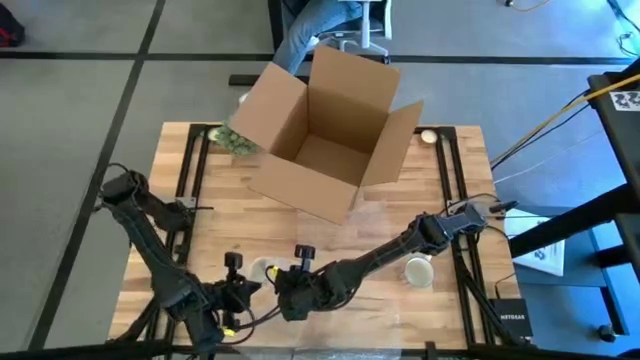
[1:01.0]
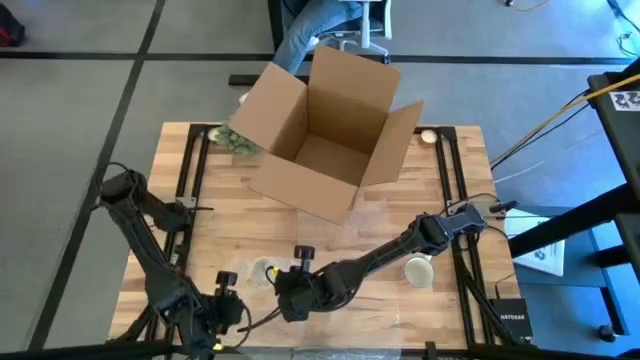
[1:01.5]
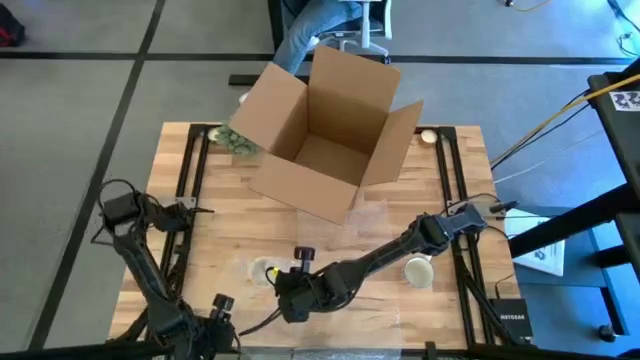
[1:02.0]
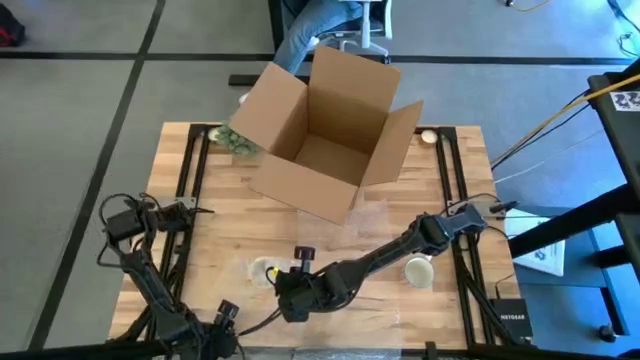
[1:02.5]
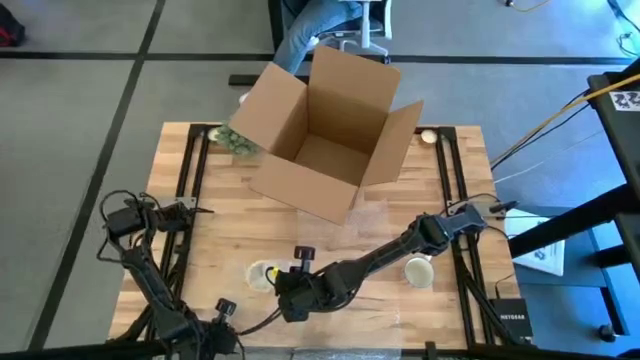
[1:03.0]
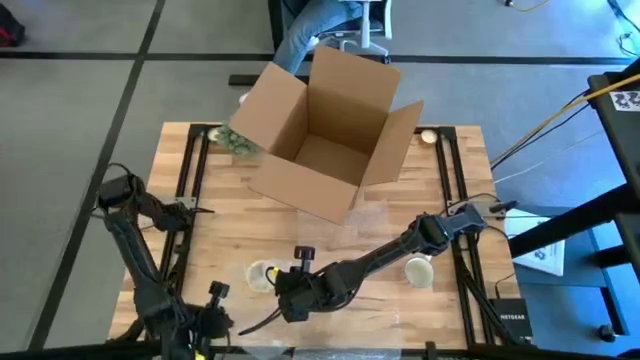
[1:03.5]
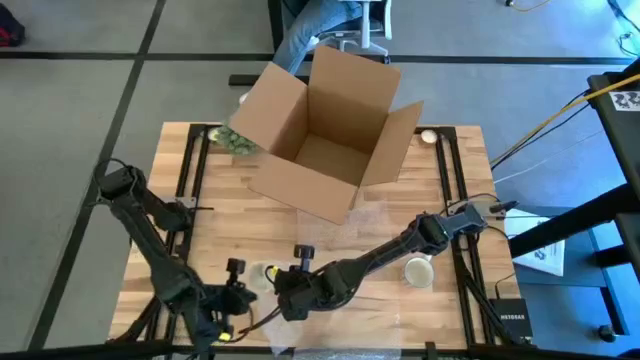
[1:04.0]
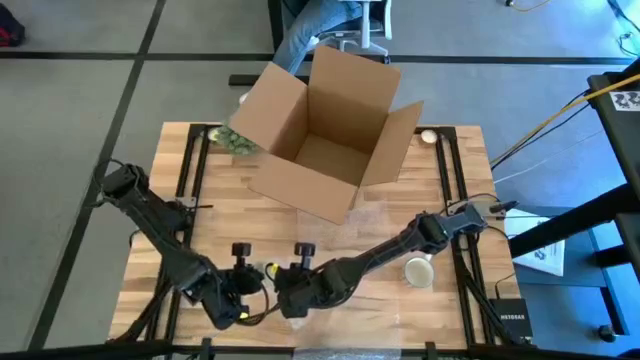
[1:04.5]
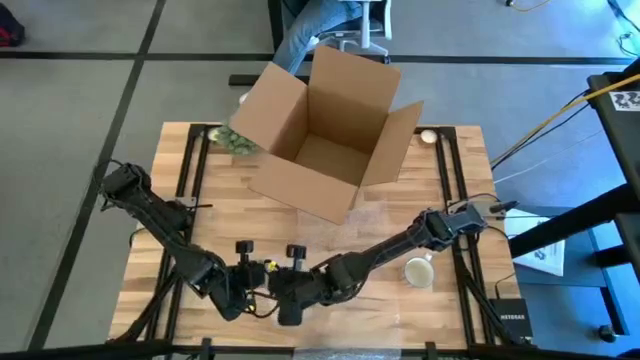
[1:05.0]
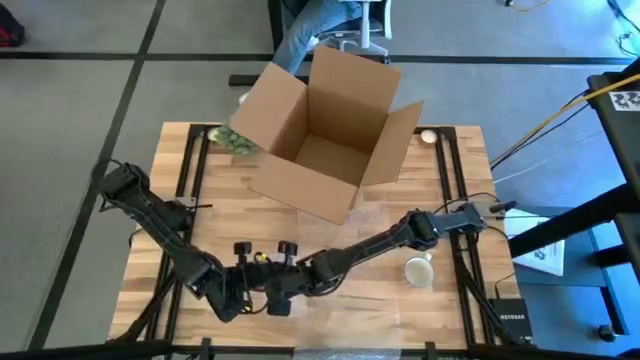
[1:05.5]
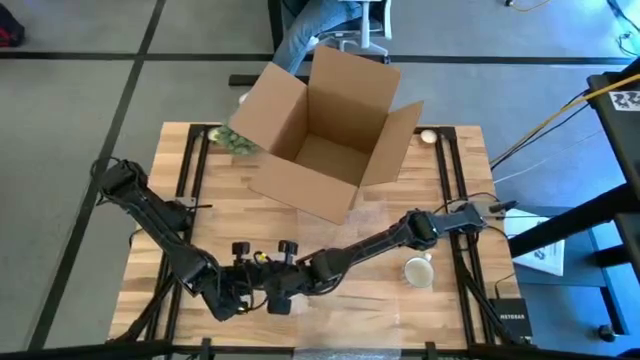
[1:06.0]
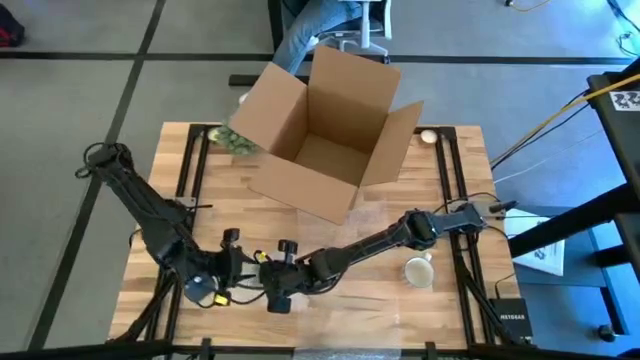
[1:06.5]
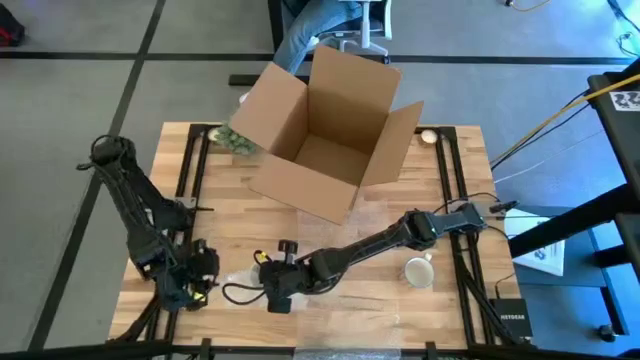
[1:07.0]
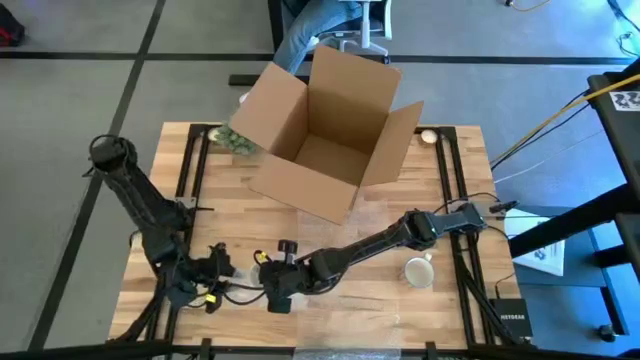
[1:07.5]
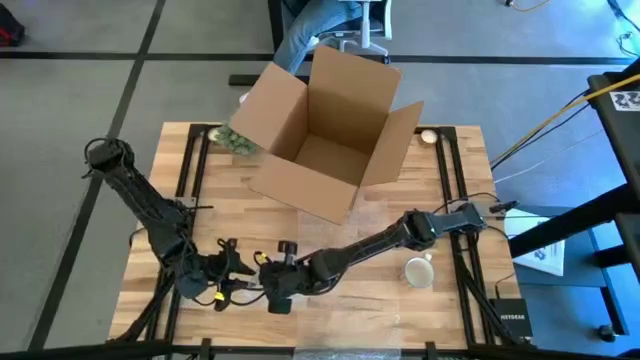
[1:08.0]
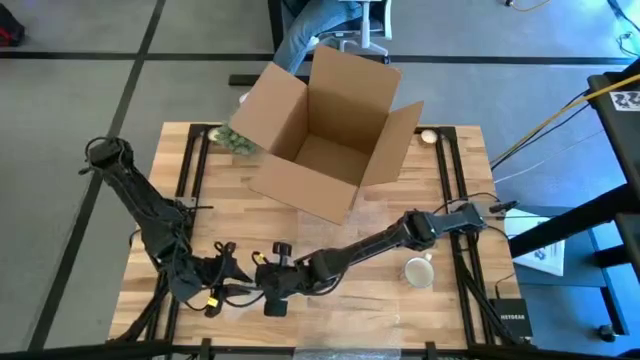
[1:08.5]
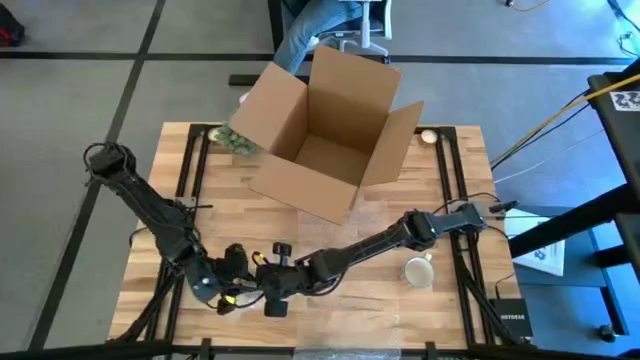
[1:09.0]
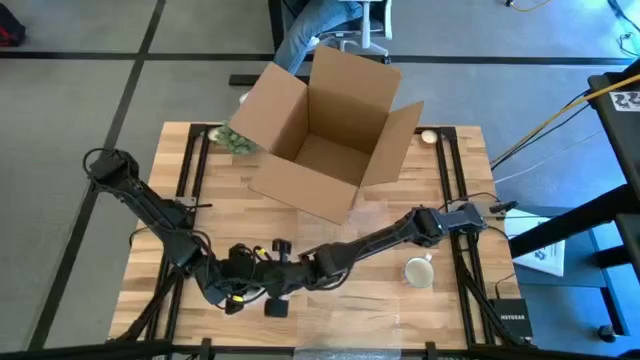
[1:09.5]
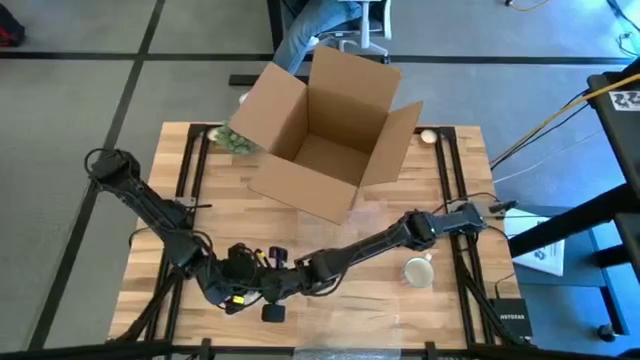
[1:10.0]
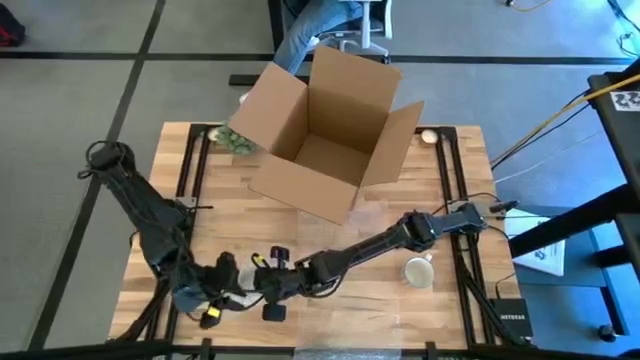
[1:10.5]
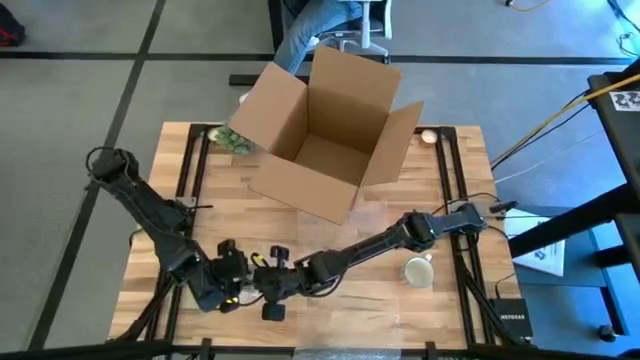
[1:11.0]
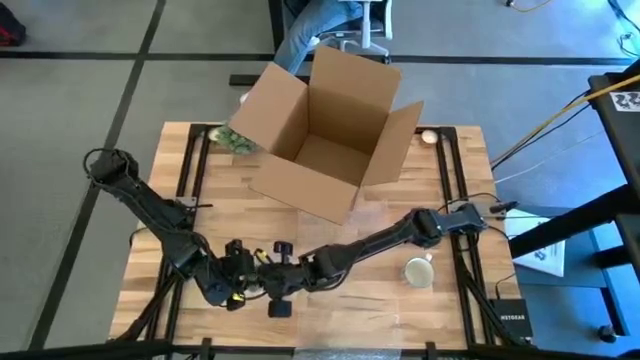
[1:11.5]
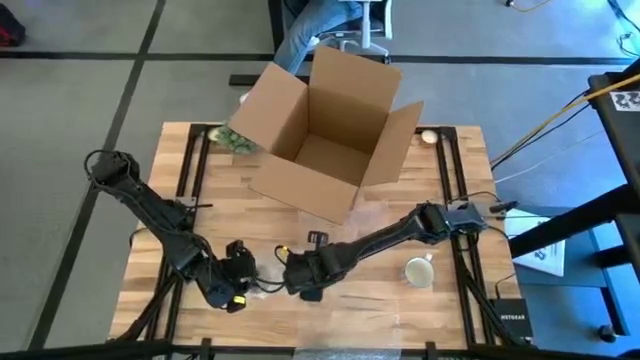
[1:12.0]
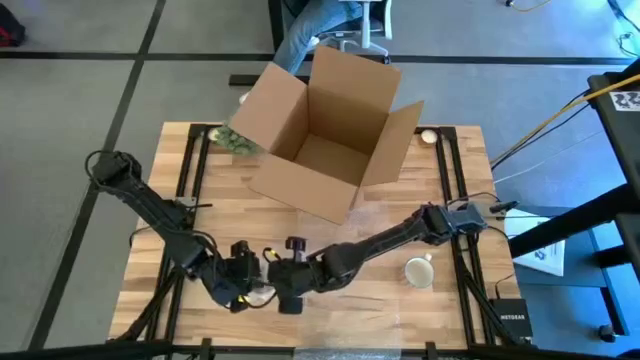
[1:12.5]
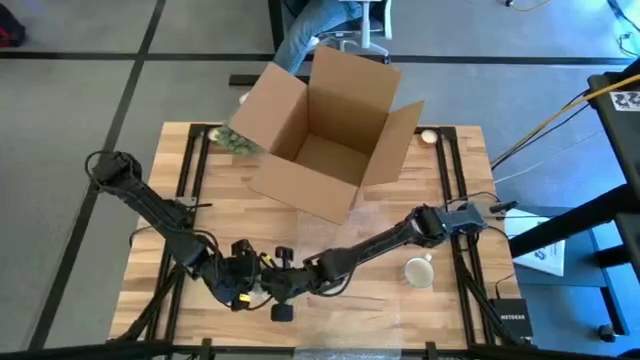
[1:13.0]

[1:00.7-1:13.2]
Task: wrap mug
Wrap the orange mug with the left bubble wrap

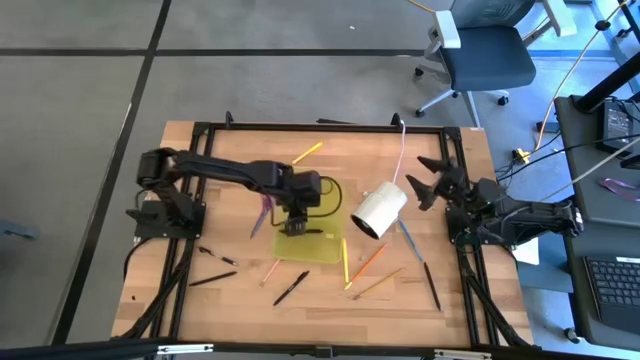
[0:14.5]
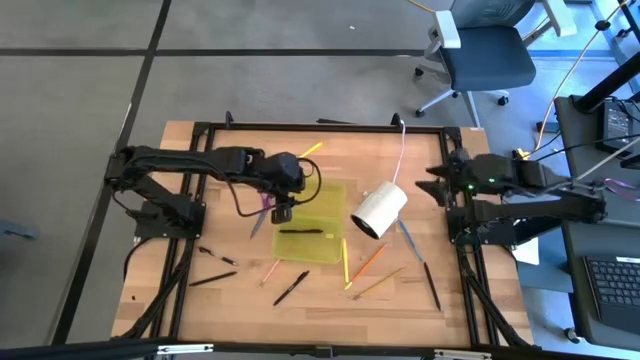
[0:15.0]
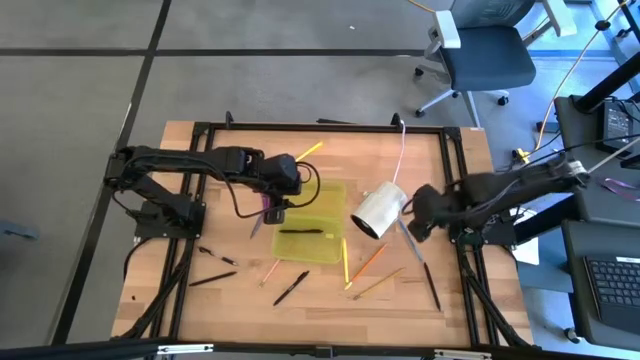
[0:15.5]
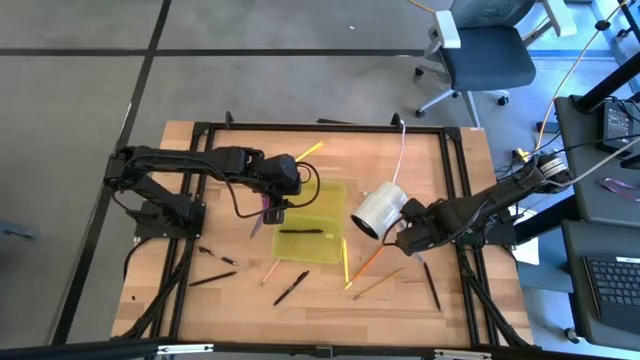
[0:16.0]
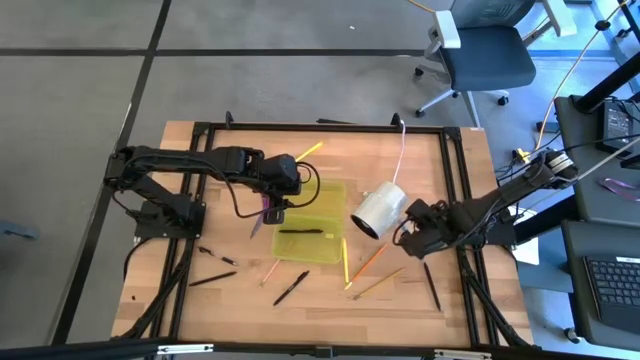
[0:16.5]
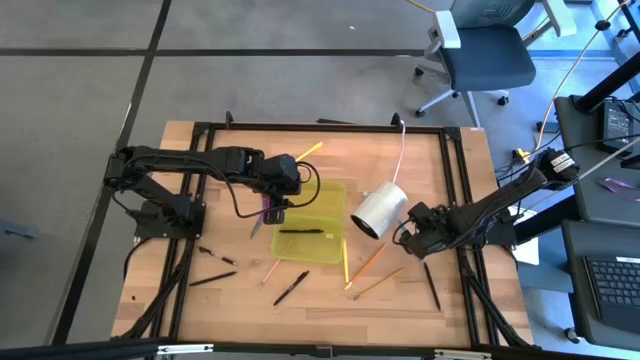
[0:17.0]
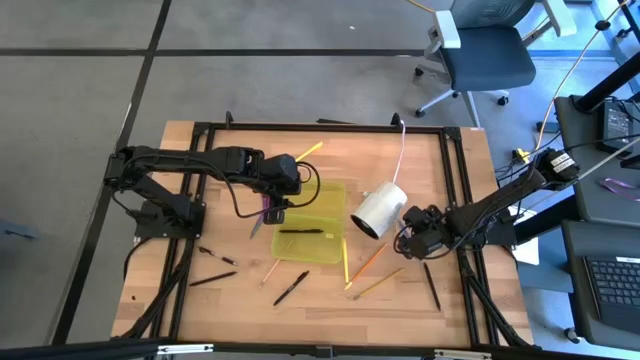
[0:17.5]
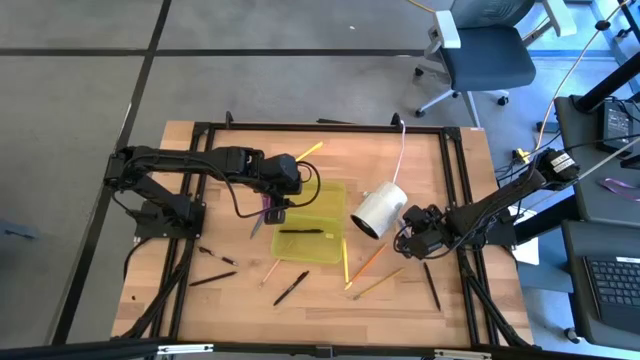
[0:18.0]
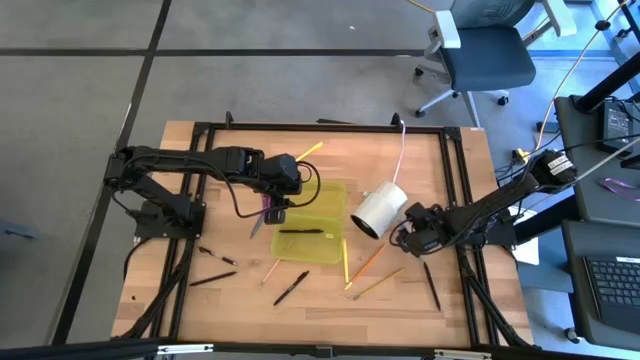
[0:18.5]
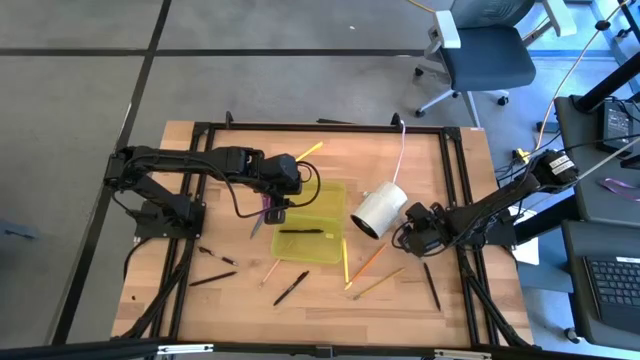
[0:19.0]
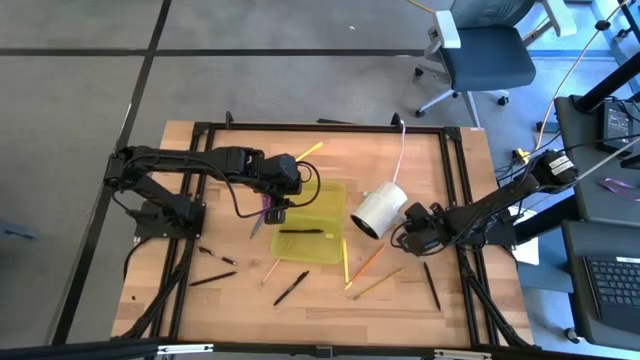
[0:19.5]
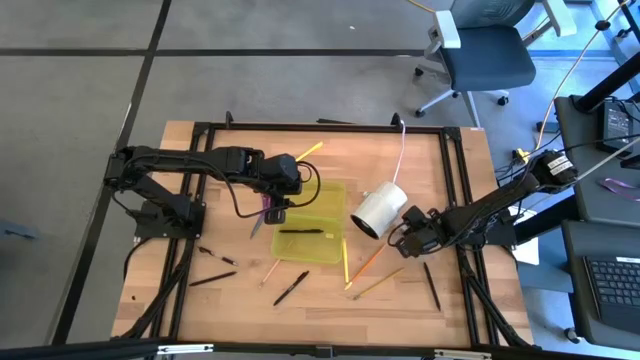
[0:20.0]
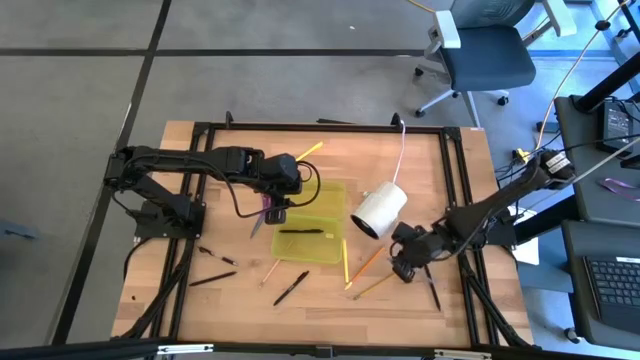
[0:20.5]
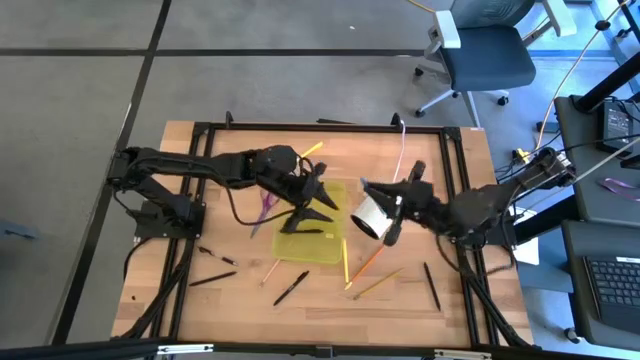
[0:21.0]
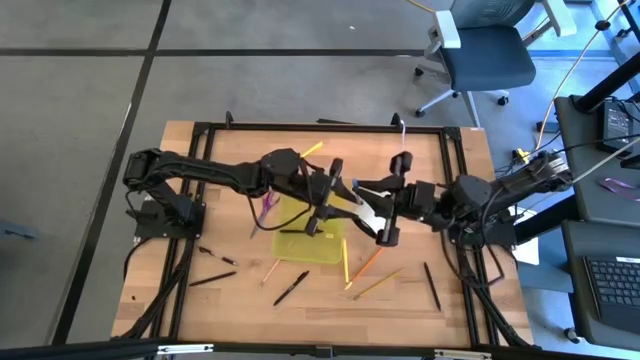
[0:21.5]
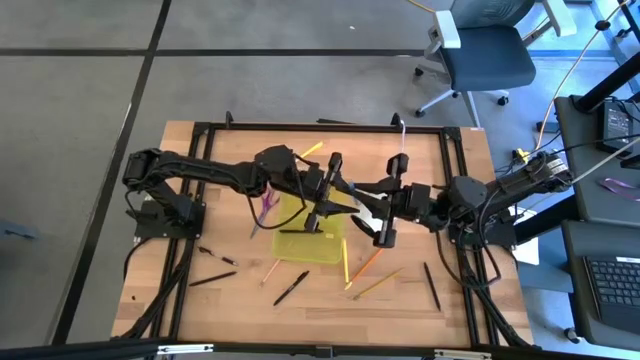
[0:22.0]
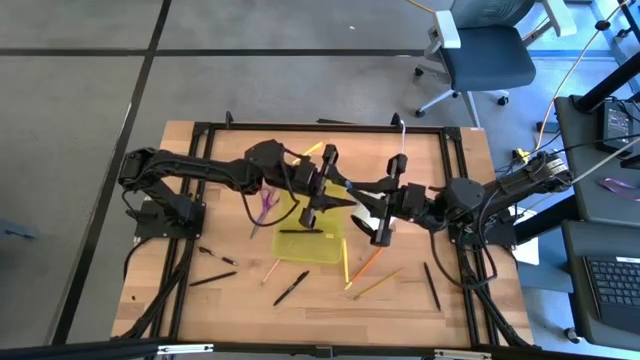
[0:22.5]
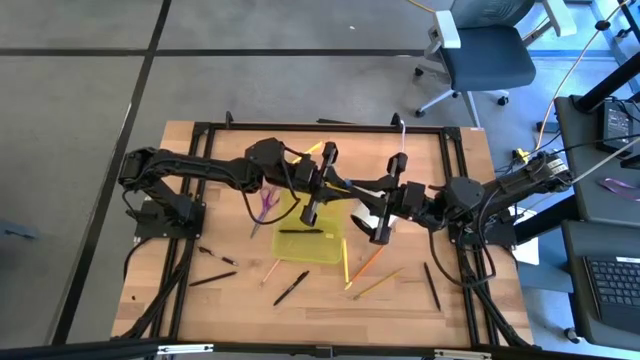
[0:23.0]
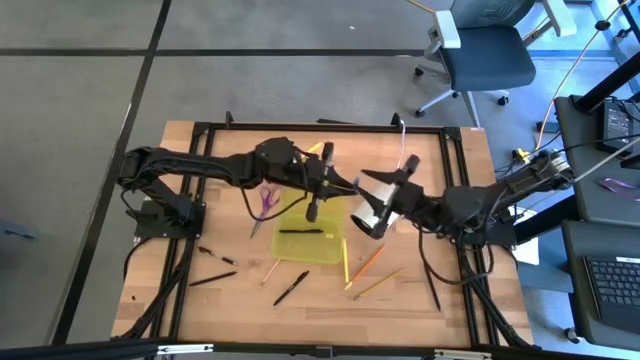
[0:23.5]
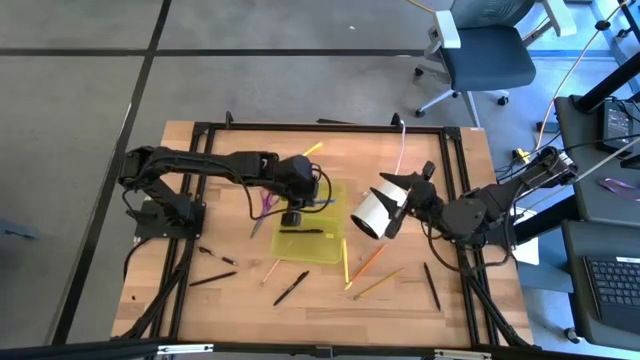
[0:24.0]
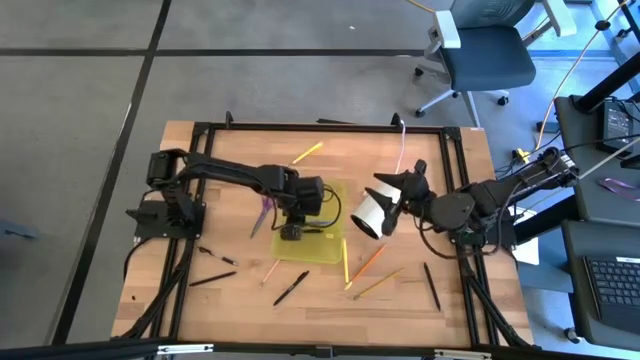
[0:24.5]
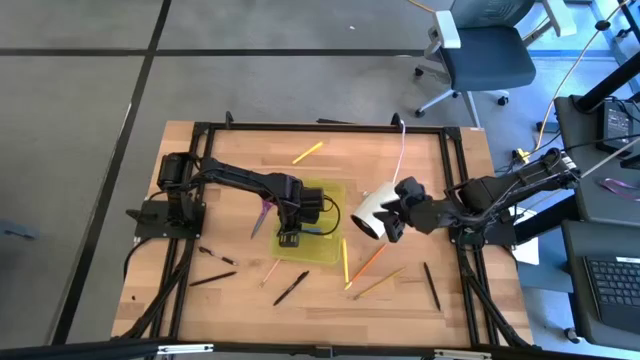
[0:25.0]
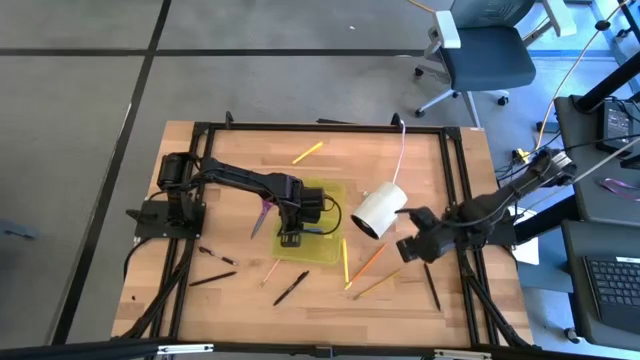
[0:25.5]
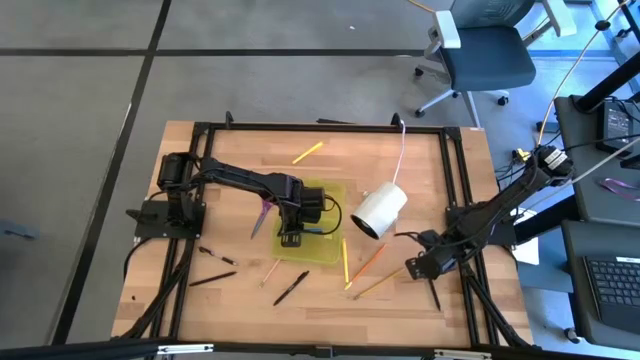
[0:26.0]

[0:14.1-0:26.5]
Task: Pick & place school supplies into a supply box
Put the blue pen into the yellow supply box
